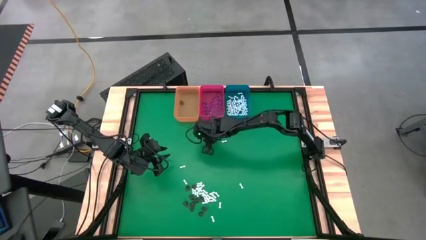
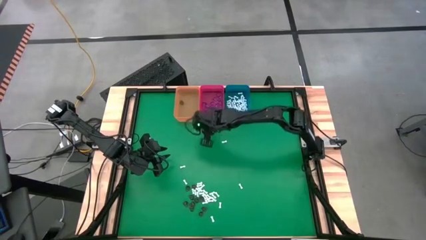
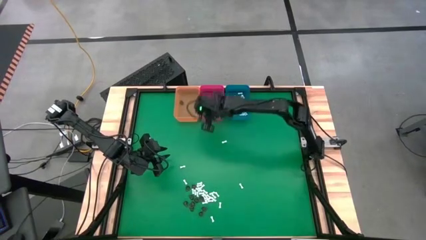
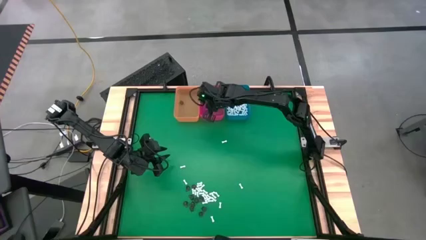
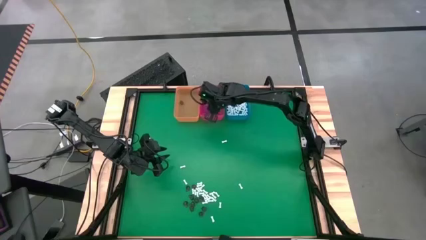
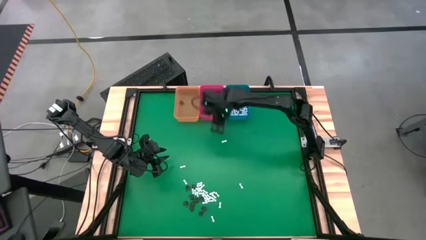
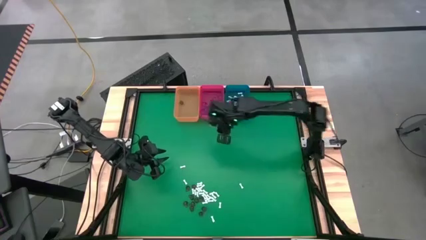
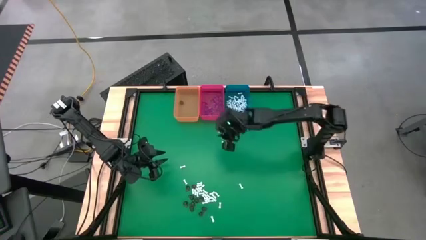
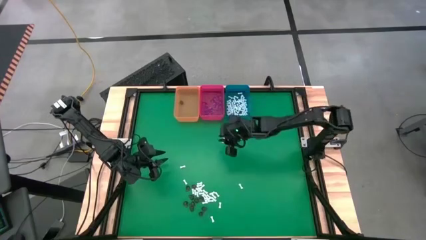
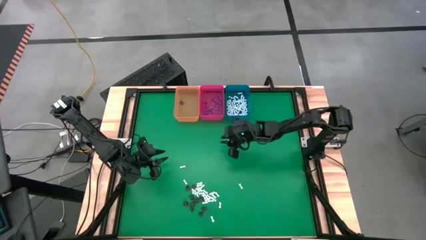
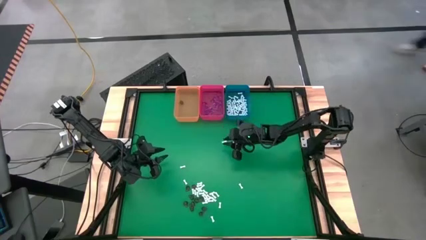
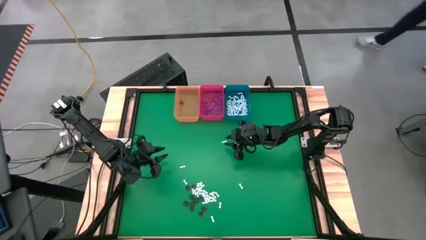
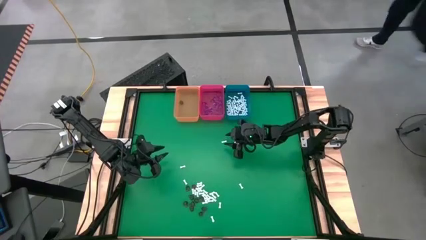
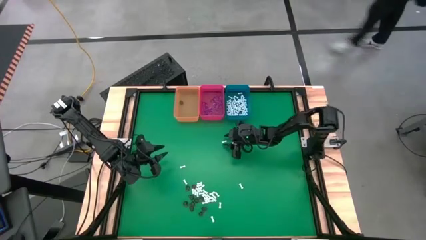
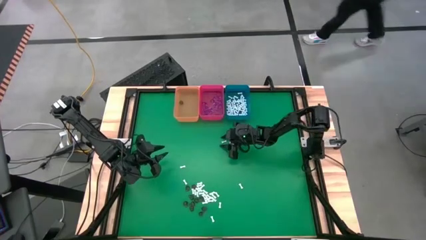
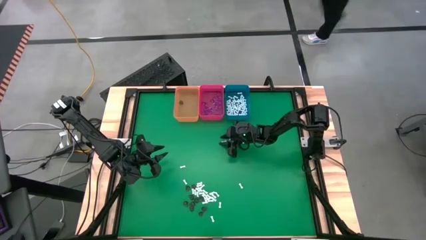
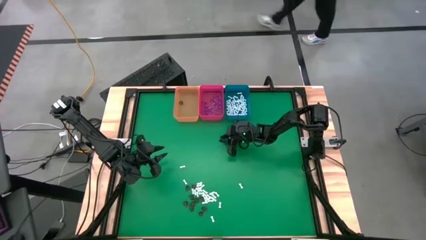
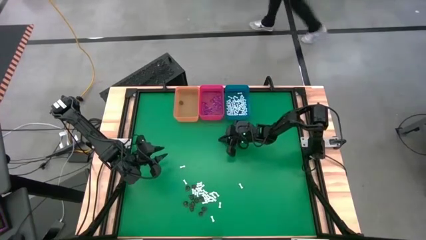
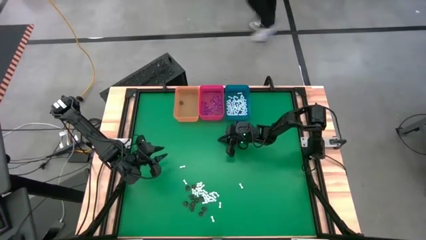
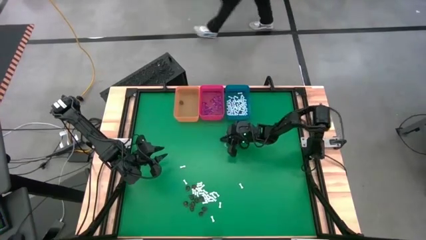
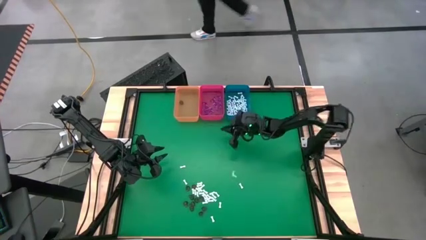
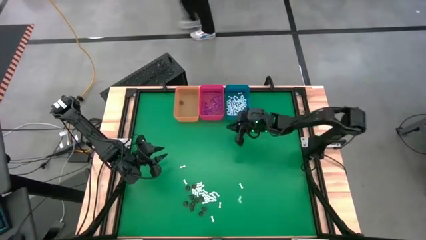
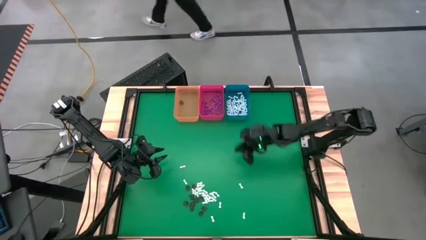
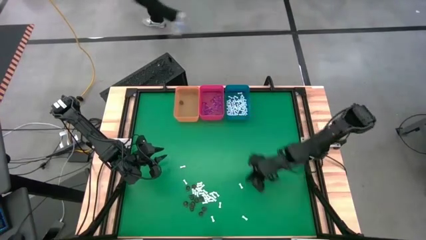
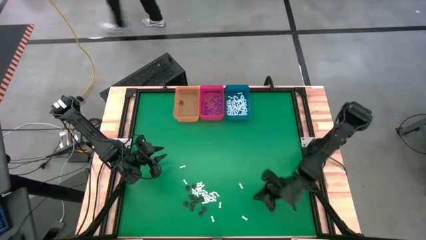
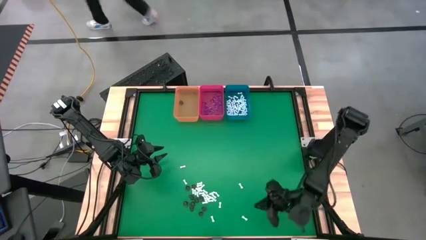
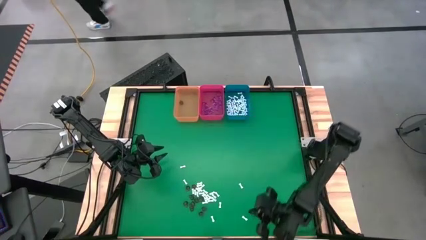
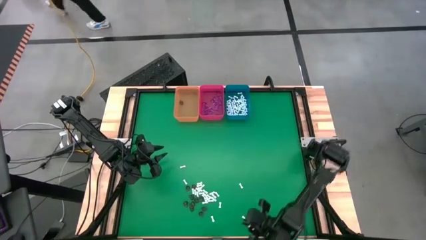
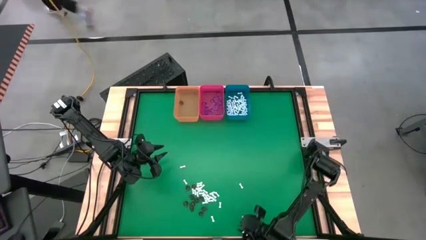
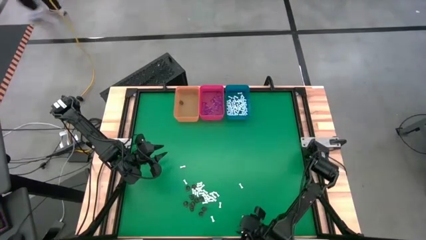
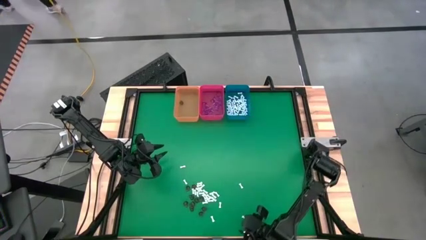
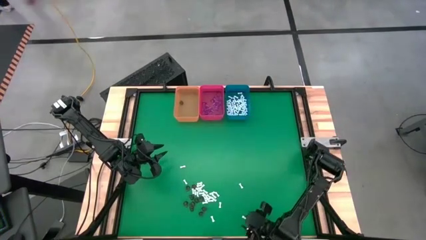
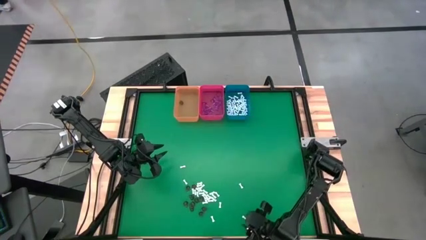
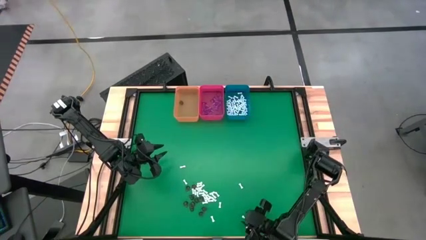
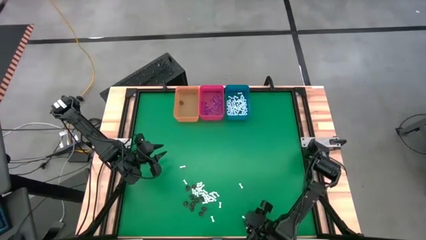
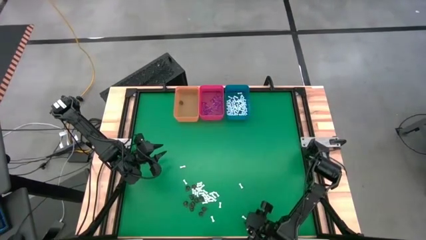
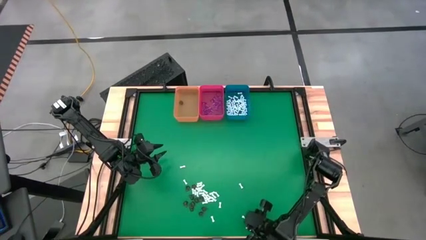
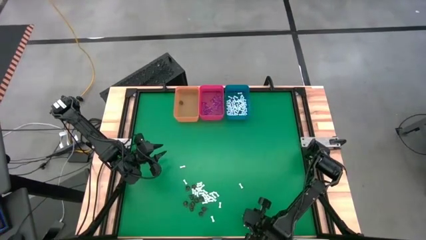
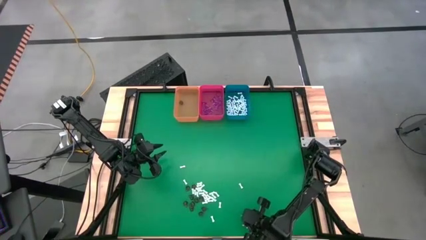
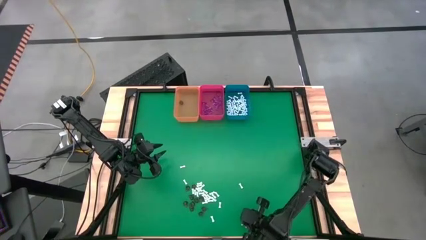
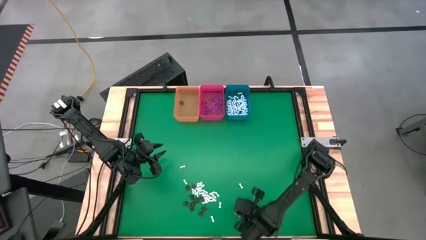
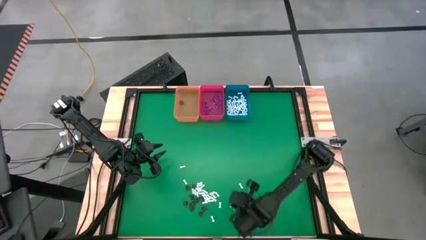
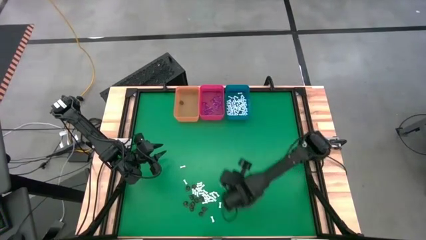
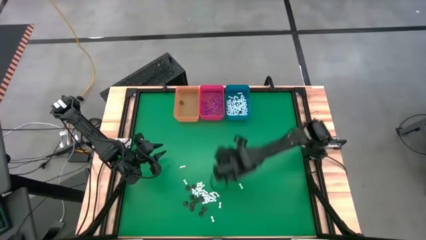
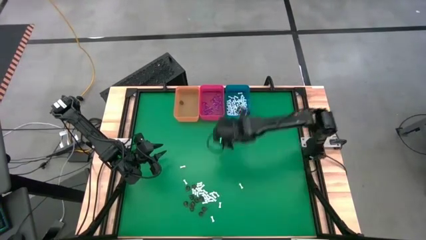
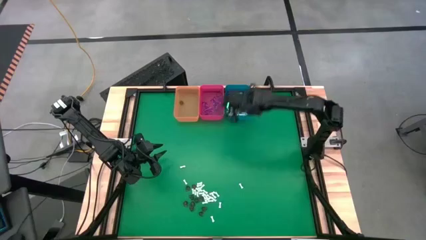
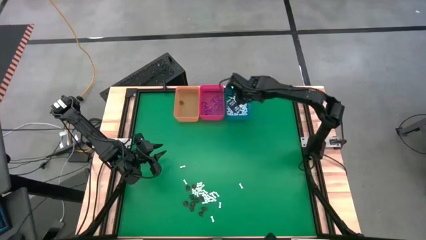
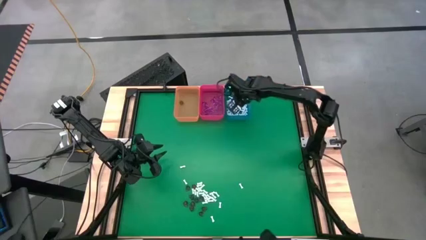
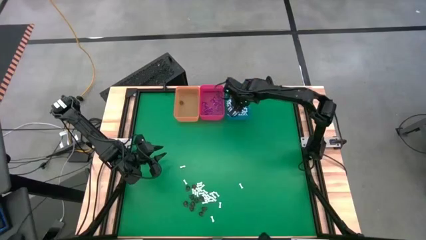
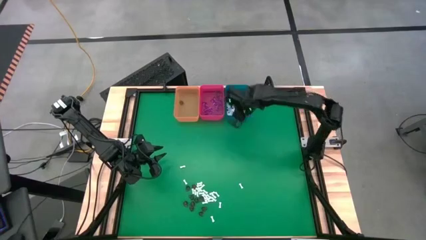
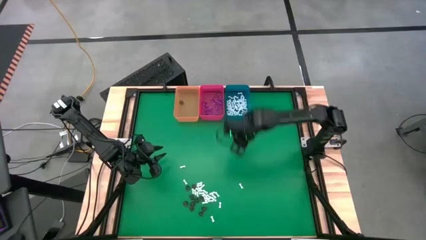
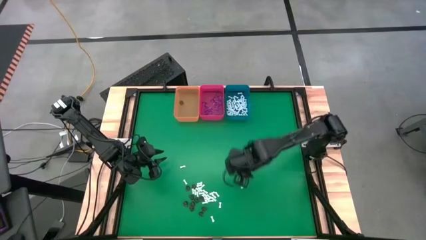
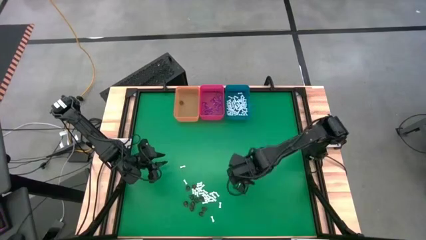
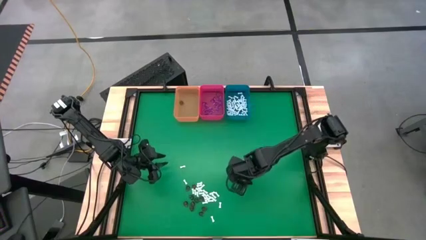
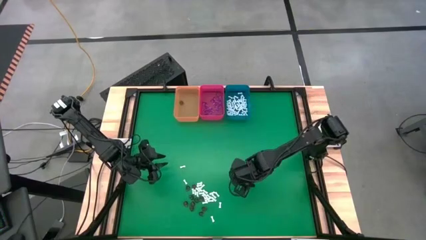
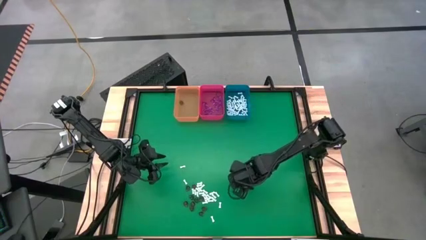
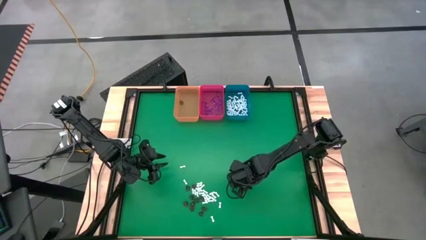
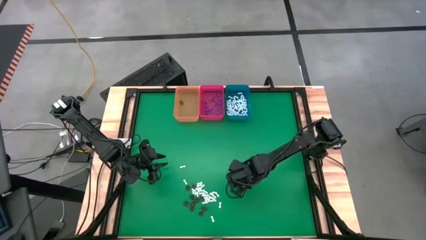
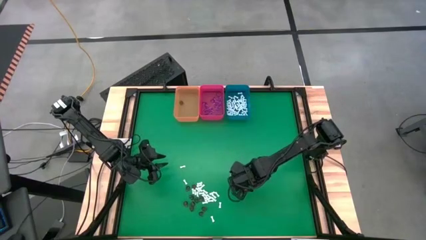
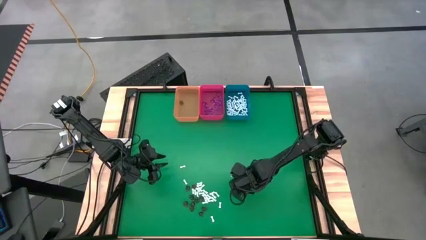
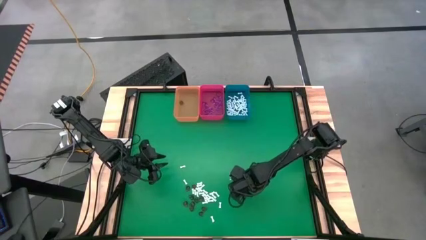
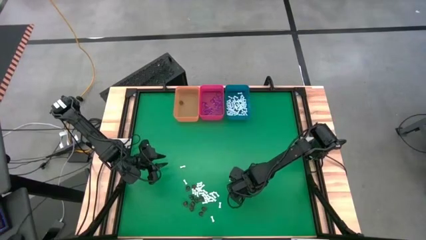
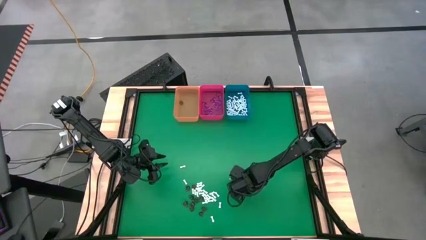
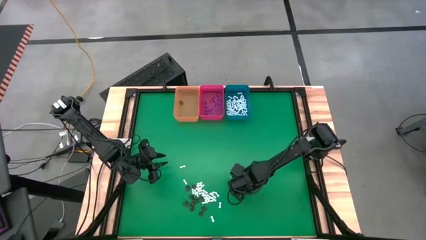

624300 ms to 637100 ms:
Task: Sort Halloween decoration
Put the violet witch hat toy into the red bin

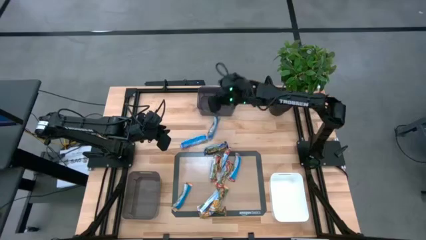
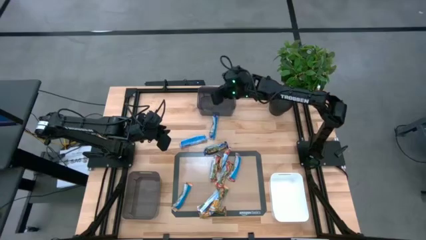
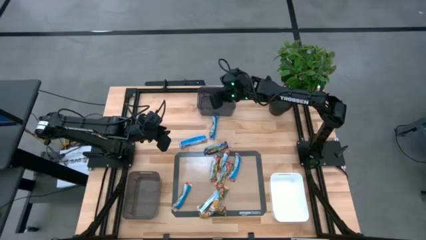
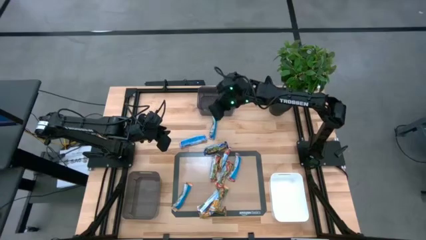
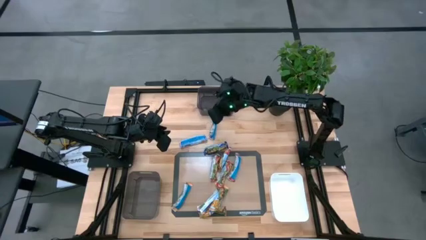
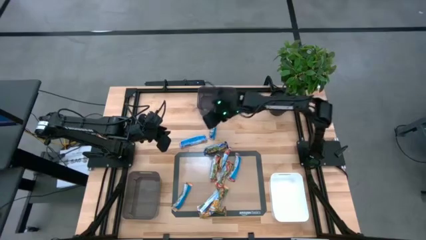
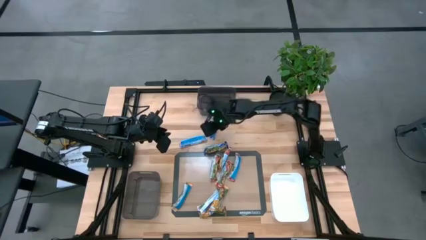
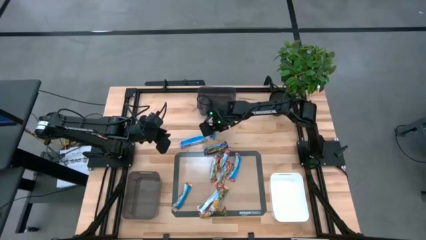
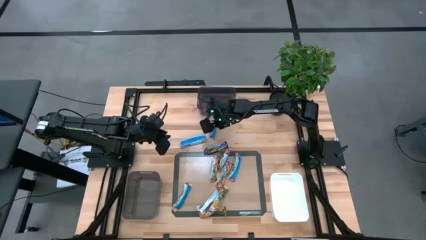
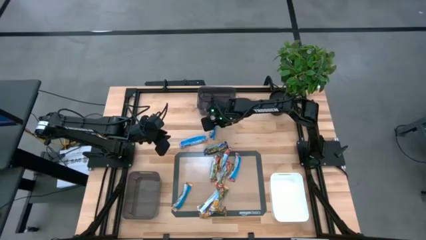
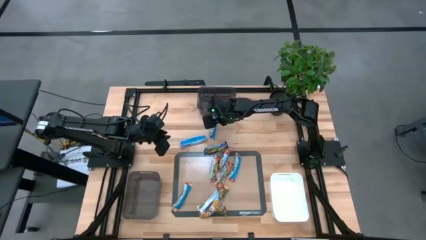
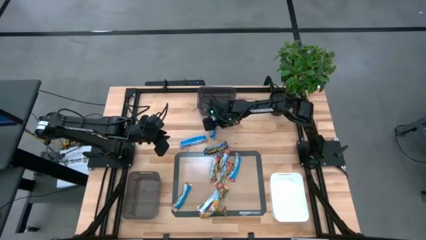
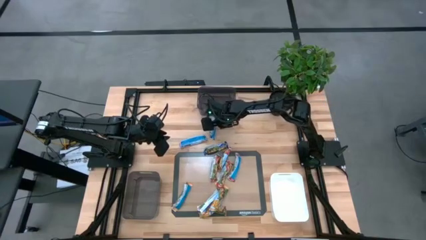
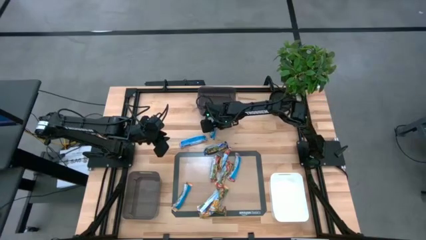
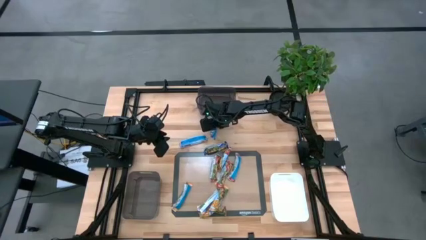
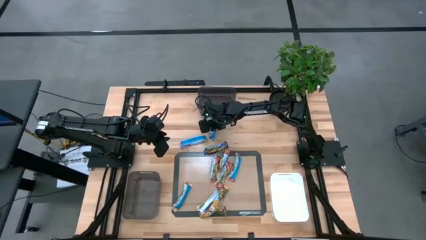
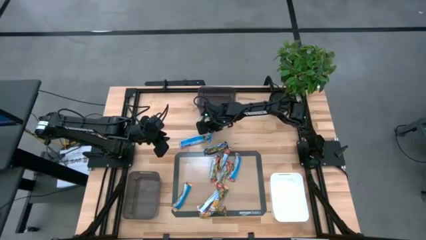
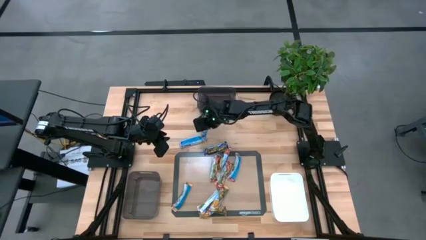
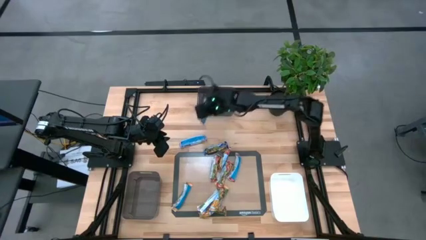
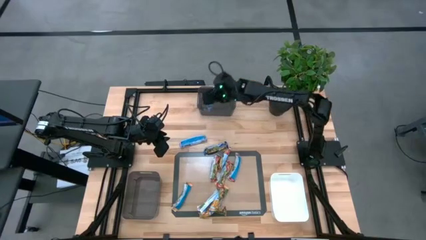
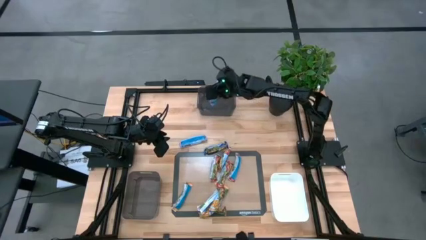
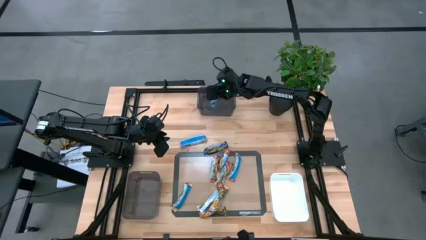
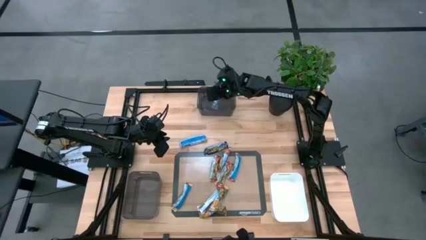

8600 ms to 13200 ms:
Task: Pick and place Granola Bars by type
Put the blue granola bar into the top black bin
